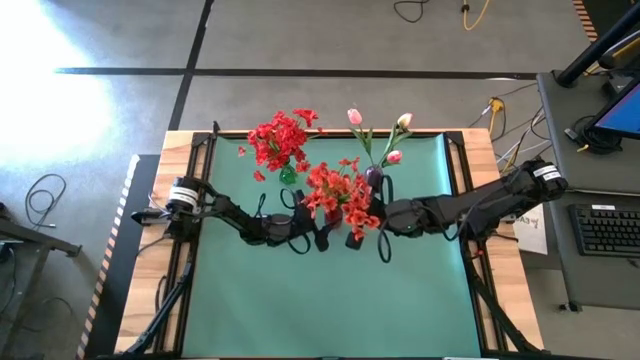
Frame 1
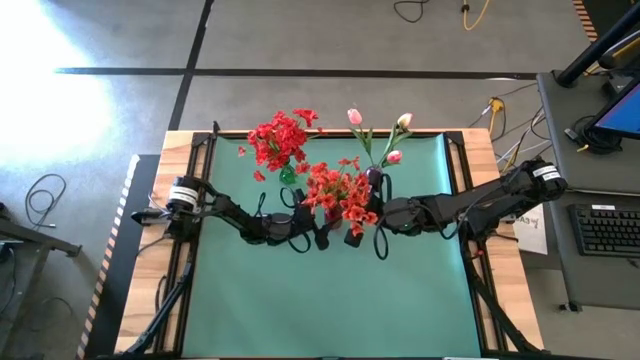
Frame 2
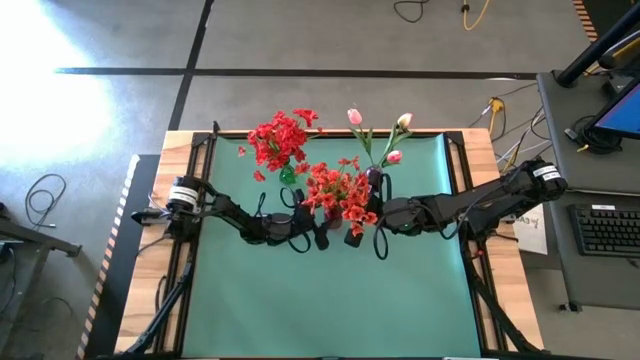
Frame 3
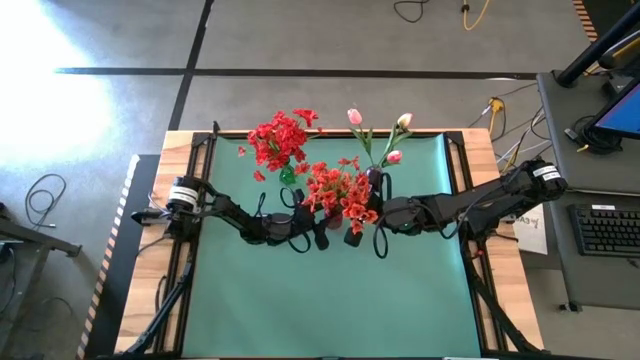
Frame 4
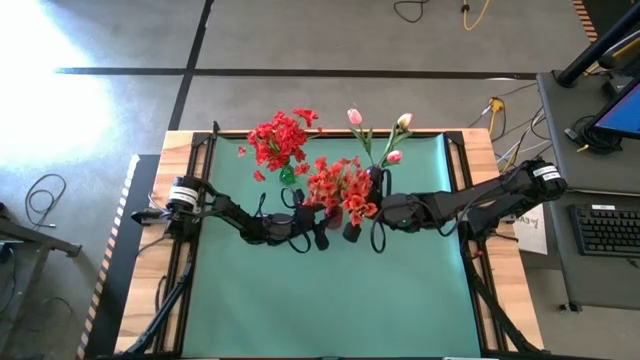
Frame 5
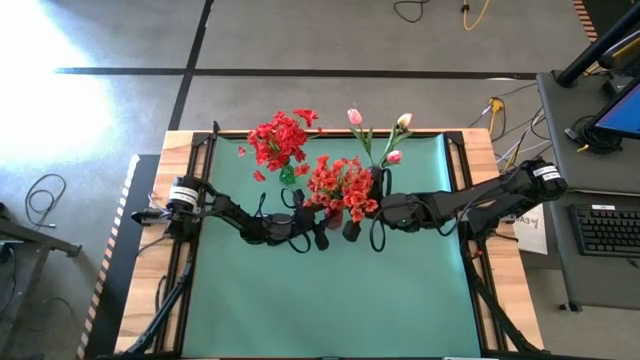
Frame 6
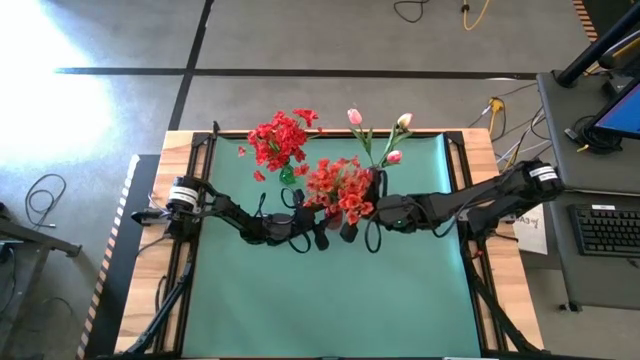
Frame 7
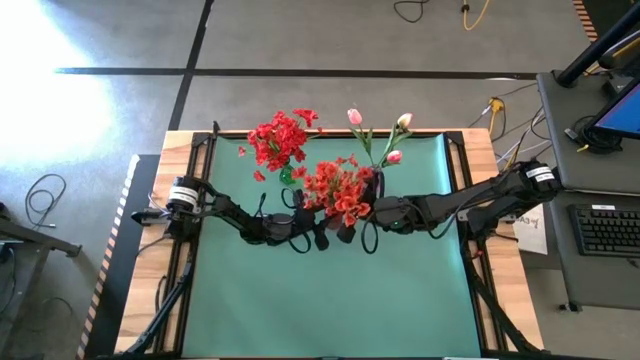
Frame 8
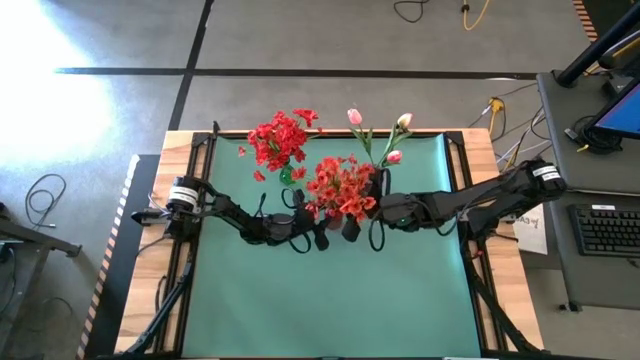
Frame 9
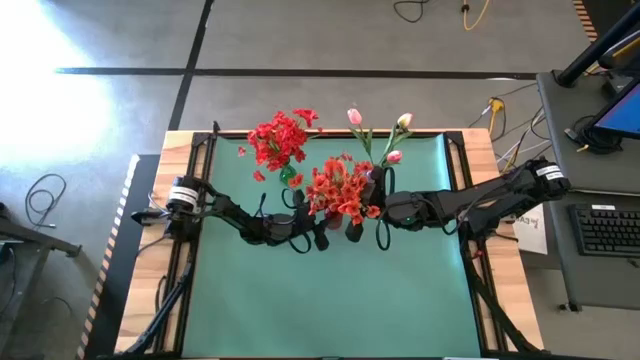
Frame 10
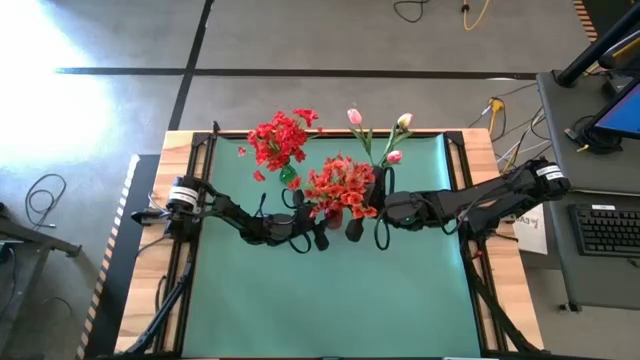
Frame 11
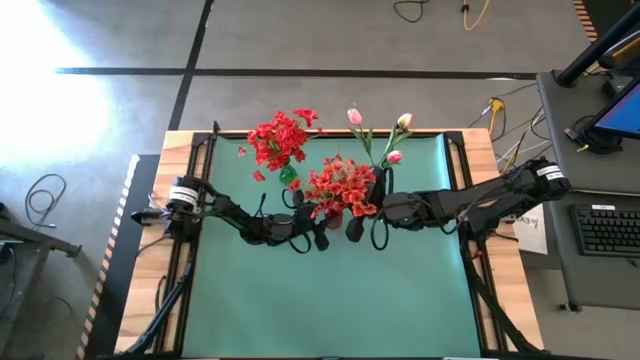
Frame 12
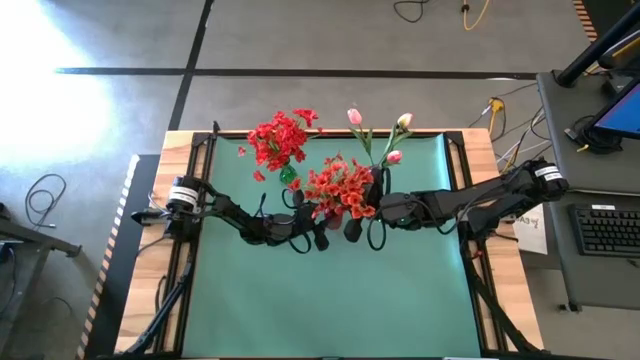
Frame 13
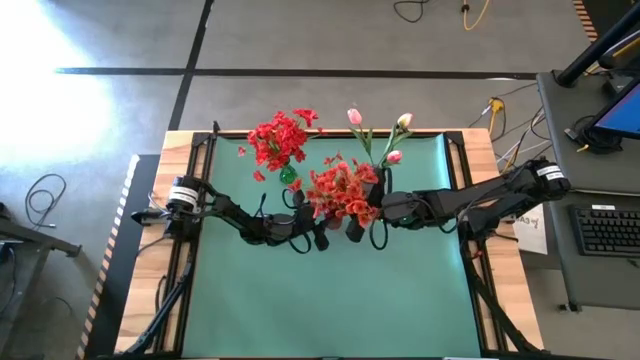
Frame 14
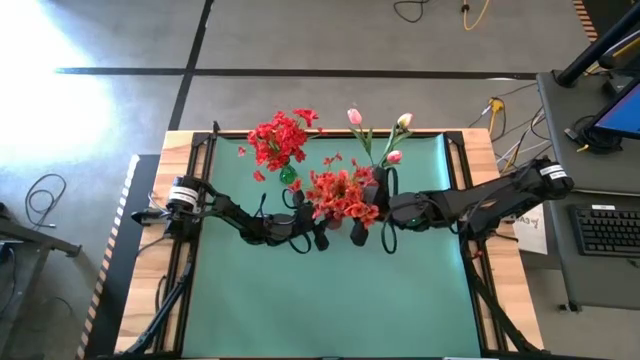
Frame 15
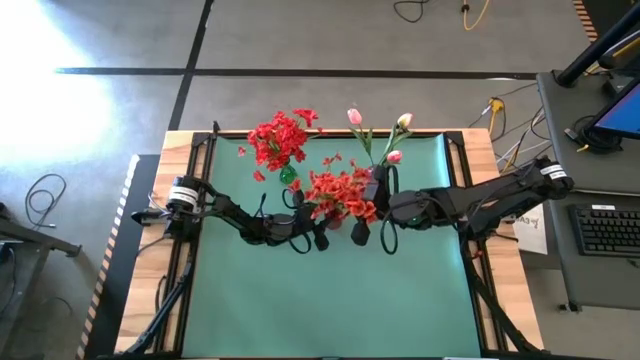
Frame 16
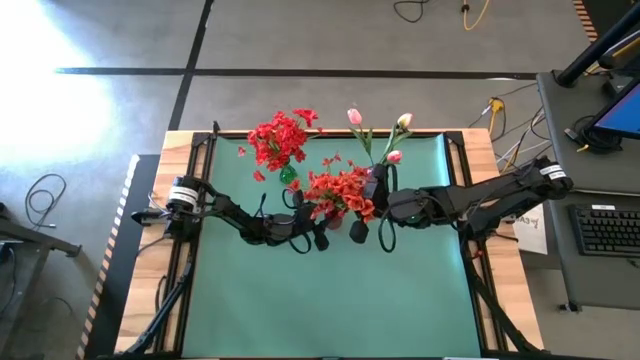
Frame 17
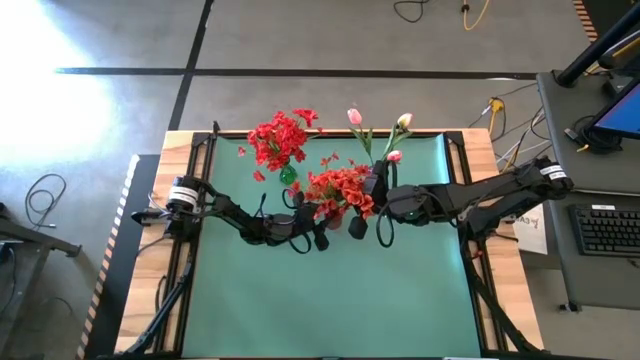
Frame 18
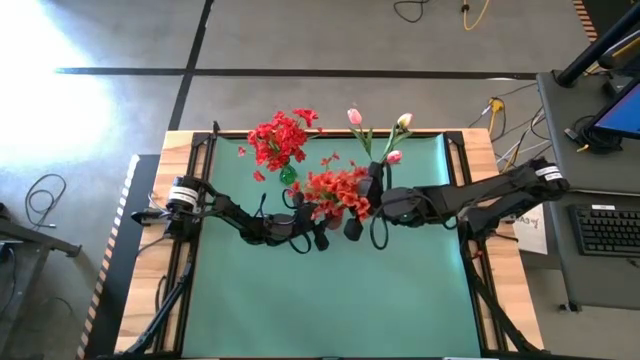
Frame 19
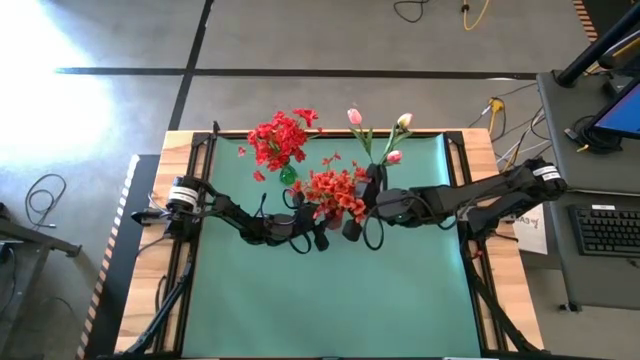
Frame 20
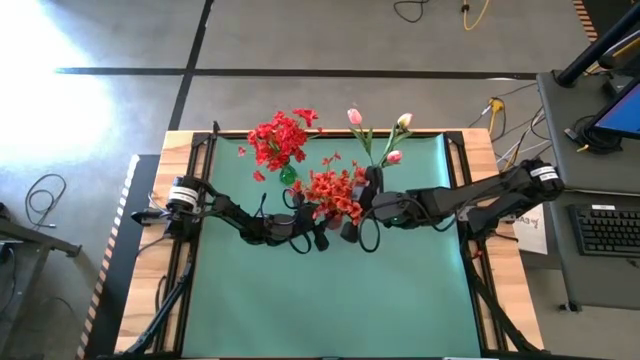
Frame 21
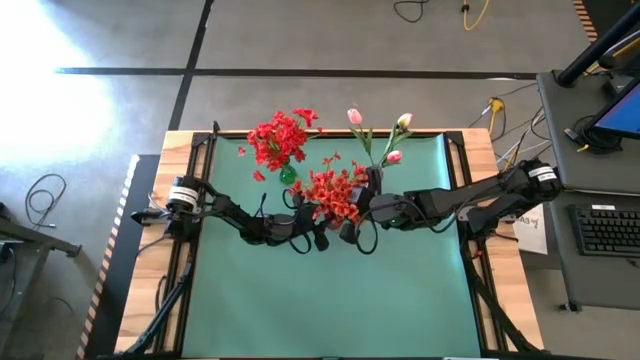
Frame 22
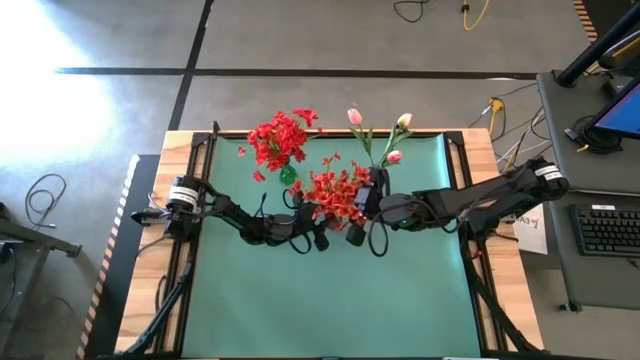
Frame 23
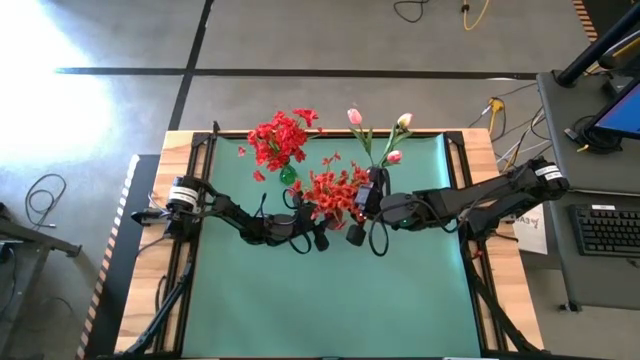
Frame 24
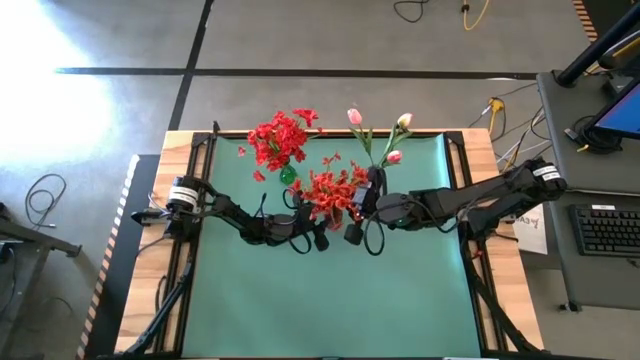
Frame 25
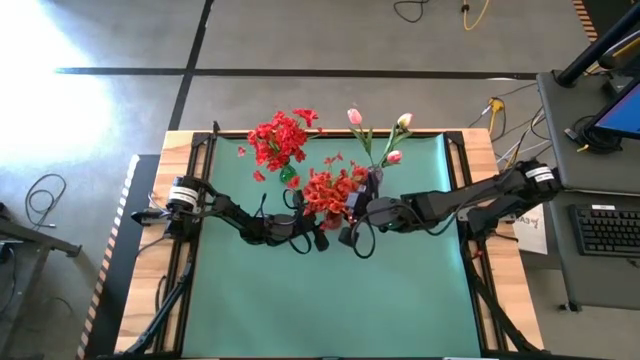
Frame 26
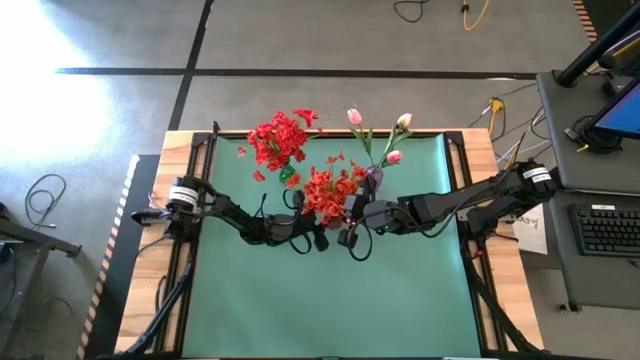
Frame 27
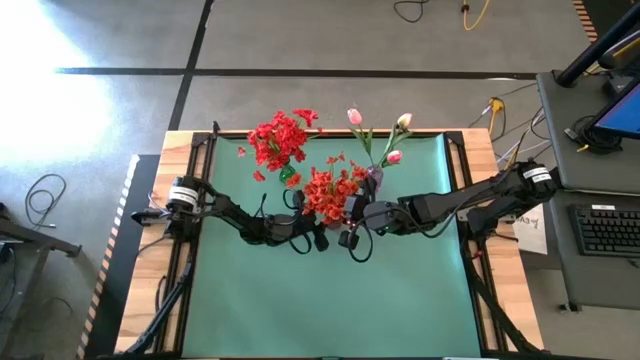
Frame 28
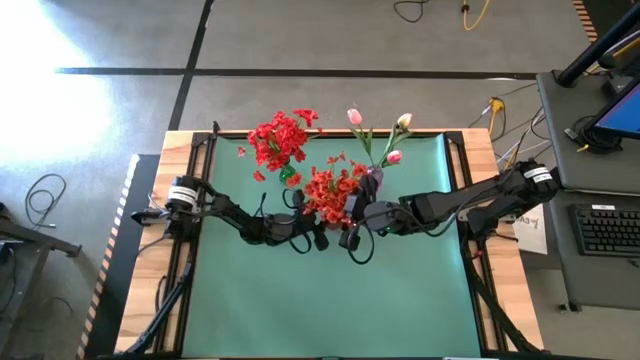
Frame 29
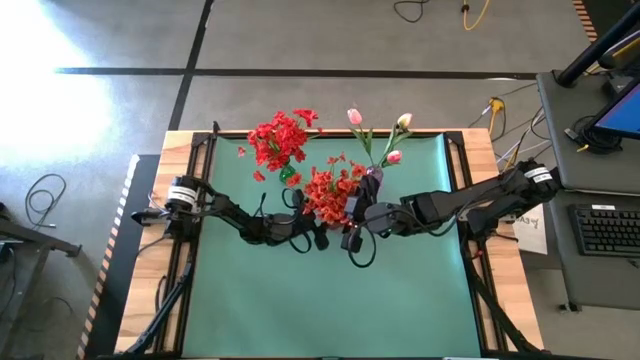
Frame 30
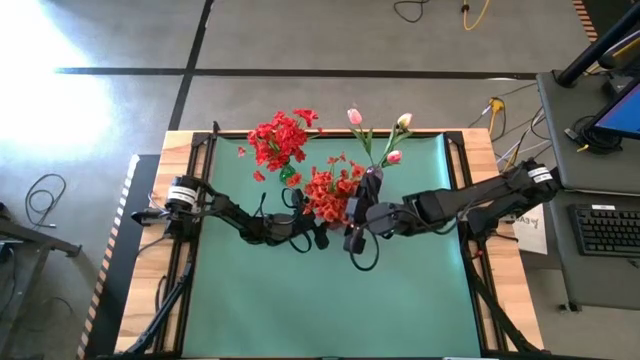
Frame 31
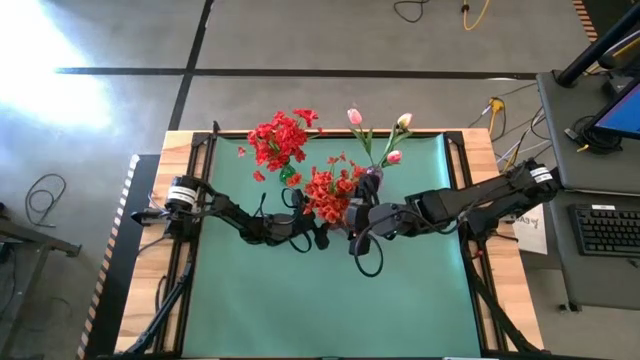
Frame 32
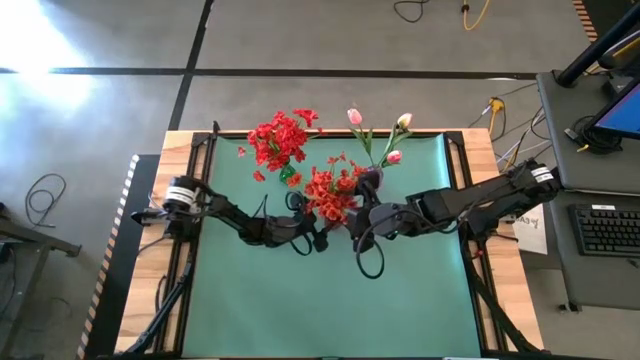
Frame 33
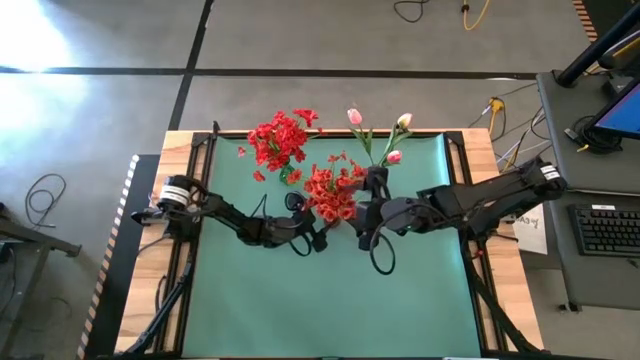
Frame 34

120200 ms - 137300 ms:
Task: Sort flowers into vase by color
Put the orange flowers into the red vase

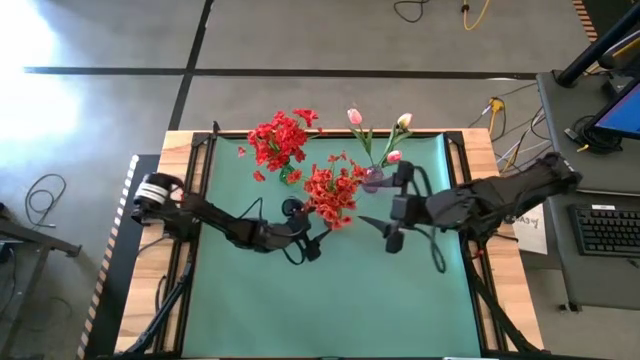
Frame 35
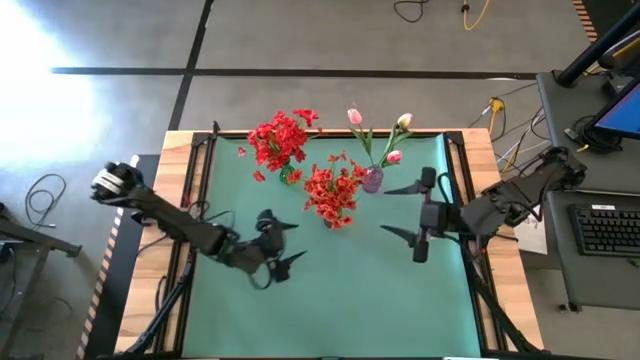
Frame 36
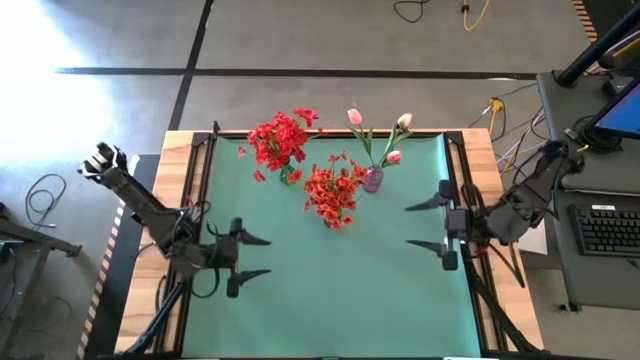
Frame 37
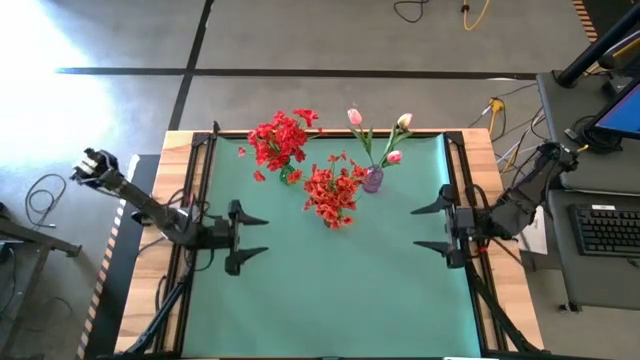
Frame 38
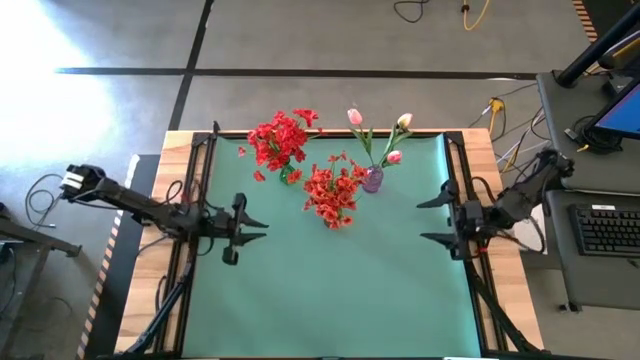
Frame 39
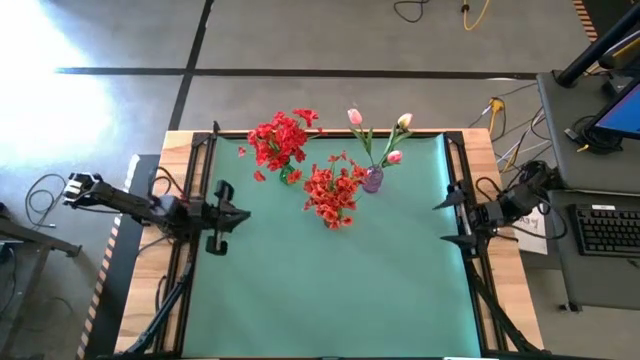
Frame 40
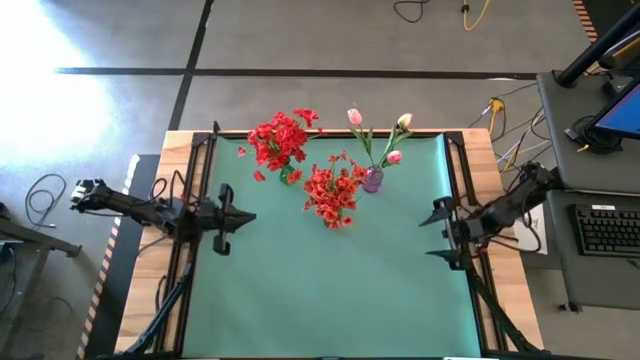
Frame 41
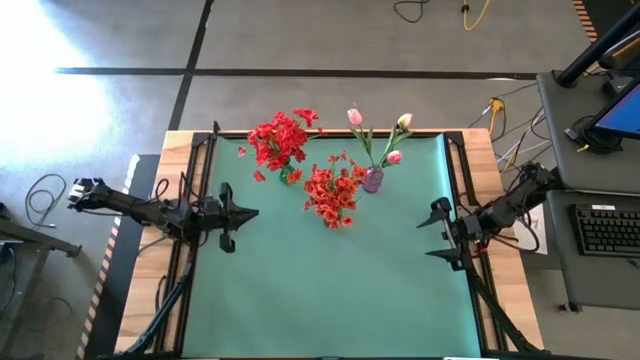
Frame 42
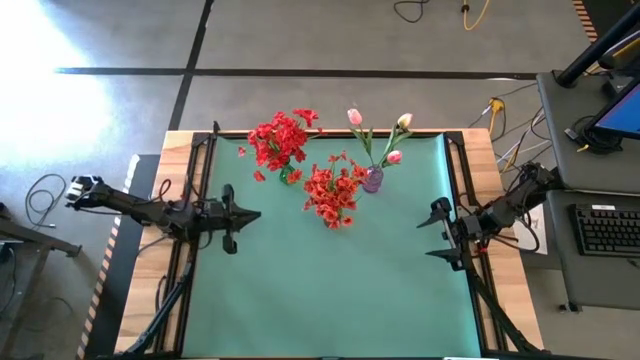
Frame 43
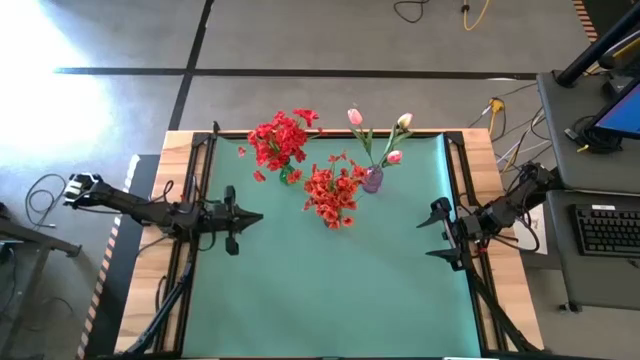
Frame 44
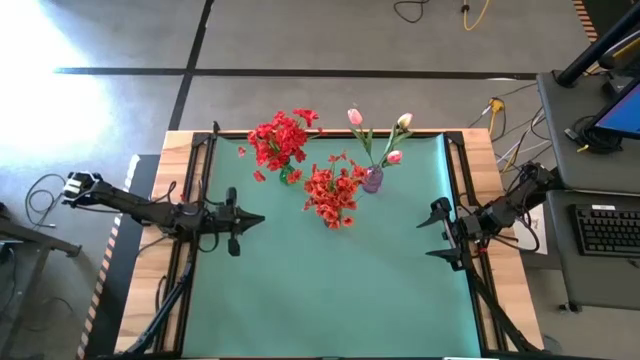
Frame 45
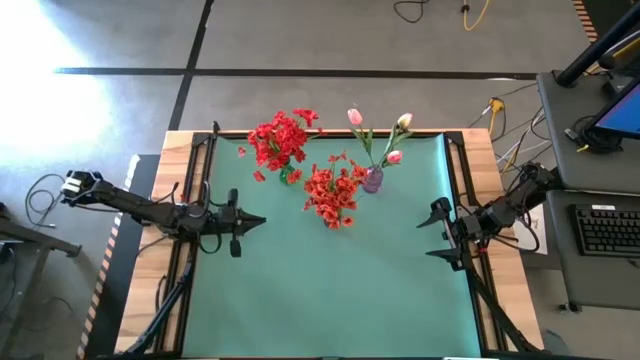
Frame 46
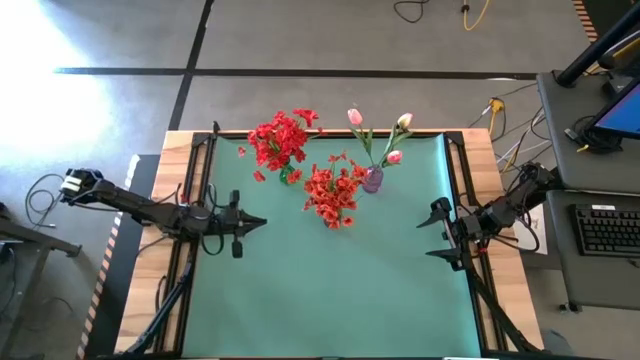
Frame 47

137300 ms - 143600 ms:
Return to Home Position
